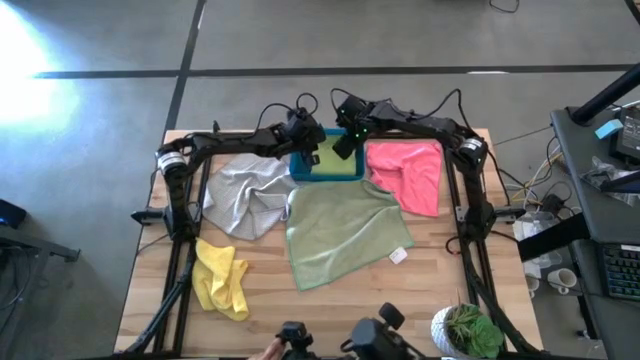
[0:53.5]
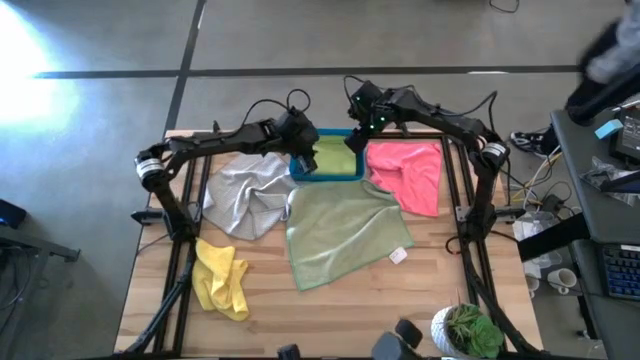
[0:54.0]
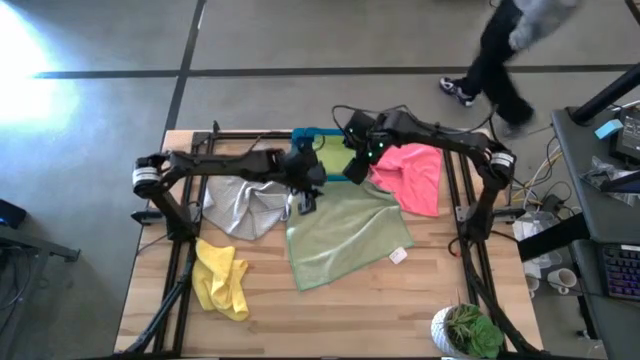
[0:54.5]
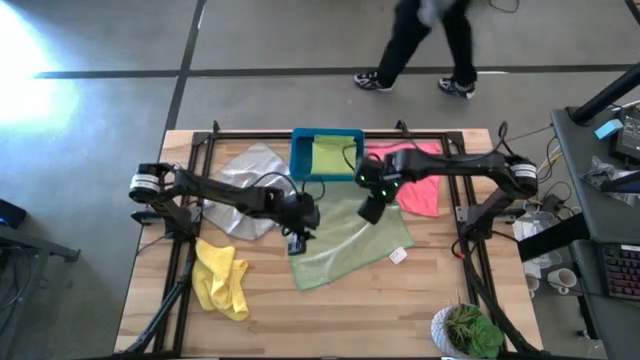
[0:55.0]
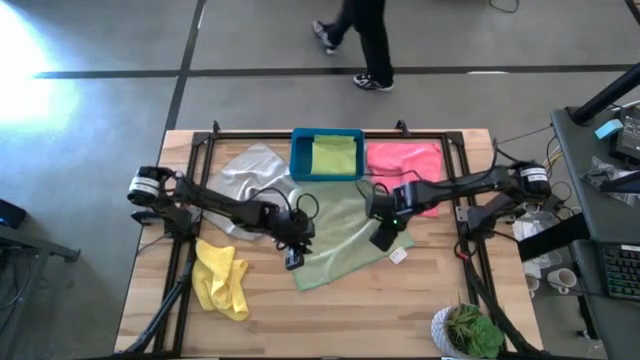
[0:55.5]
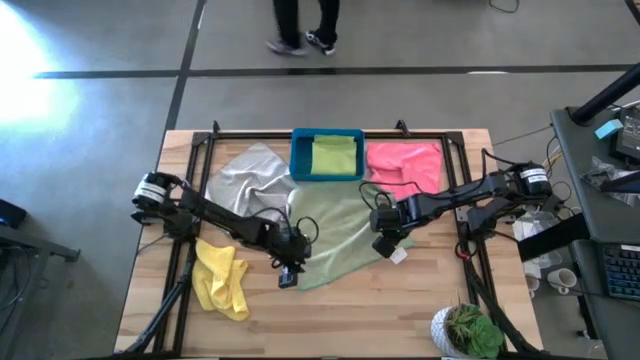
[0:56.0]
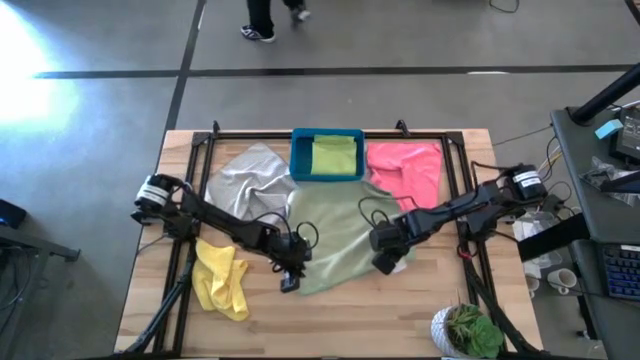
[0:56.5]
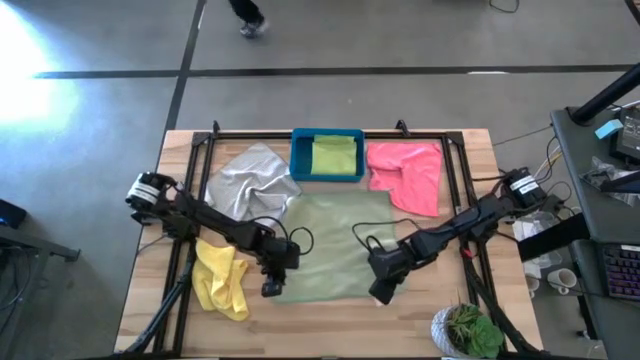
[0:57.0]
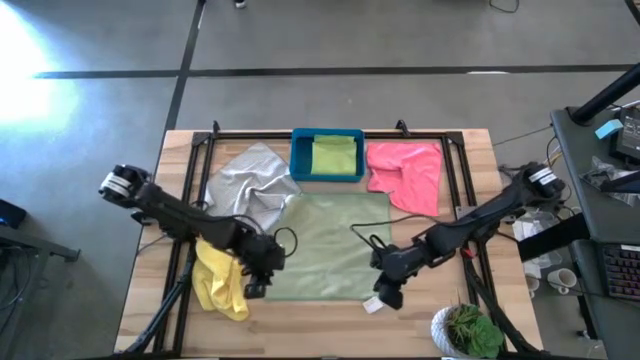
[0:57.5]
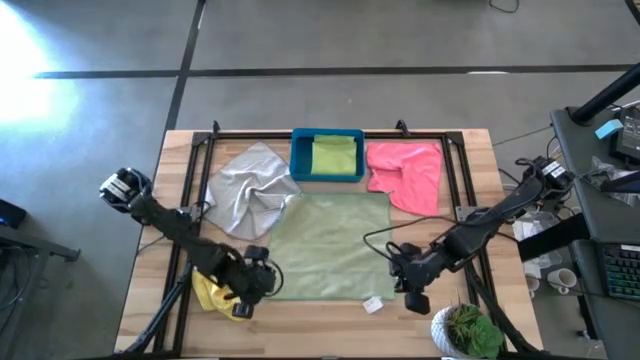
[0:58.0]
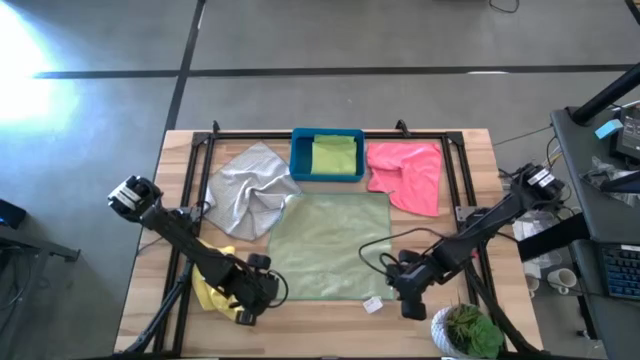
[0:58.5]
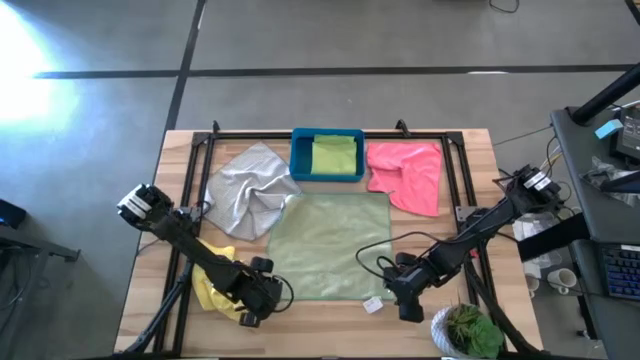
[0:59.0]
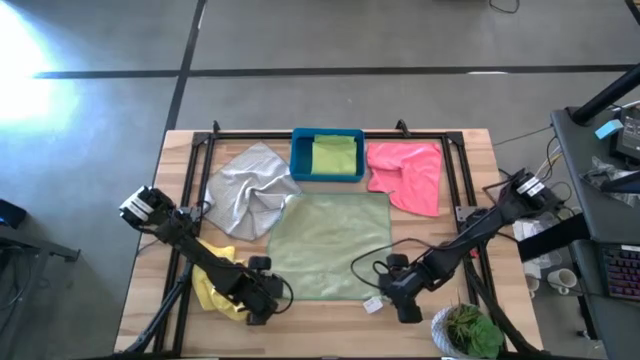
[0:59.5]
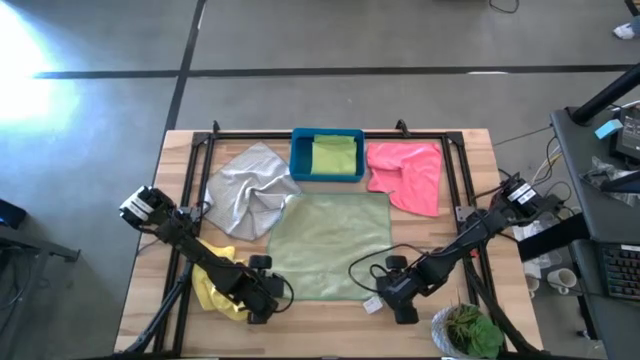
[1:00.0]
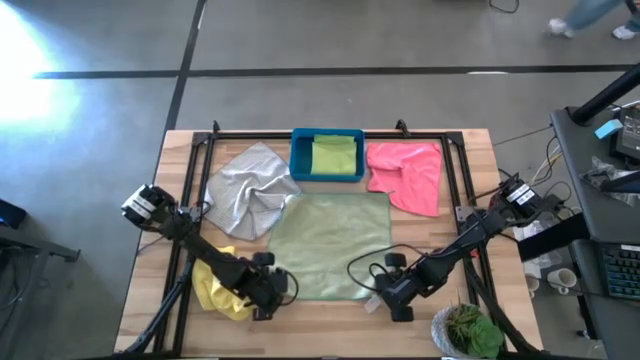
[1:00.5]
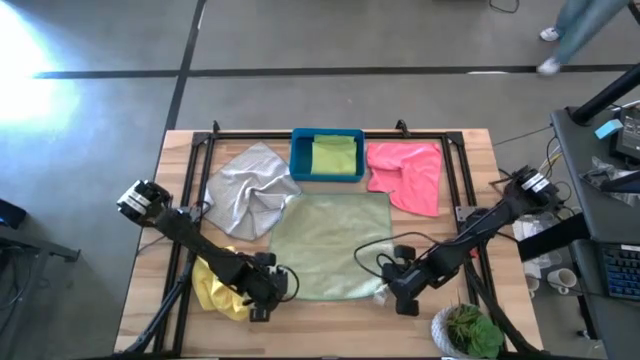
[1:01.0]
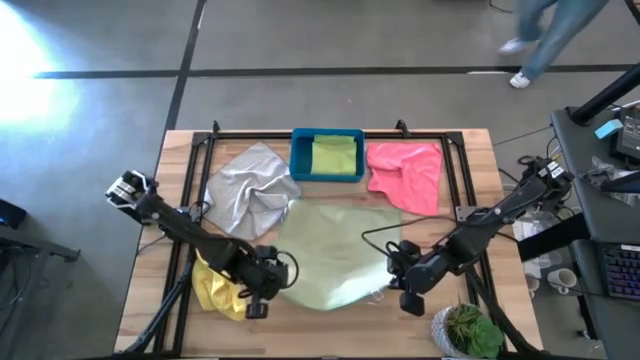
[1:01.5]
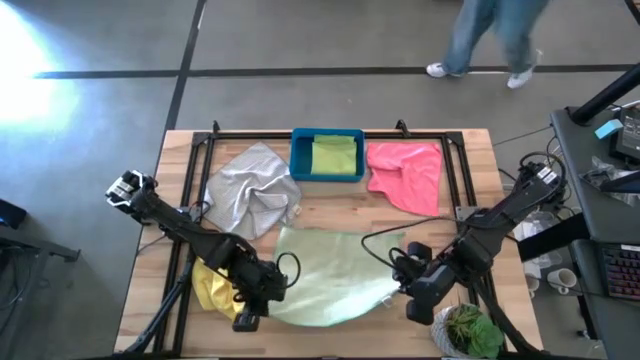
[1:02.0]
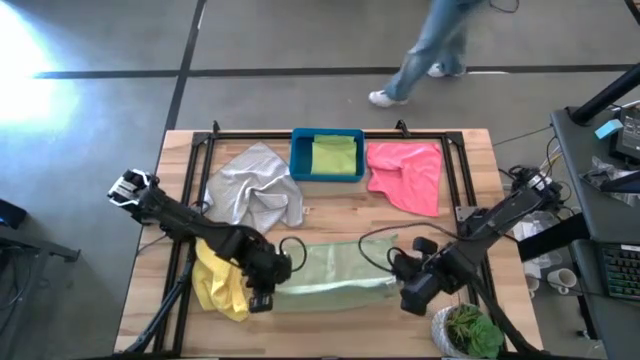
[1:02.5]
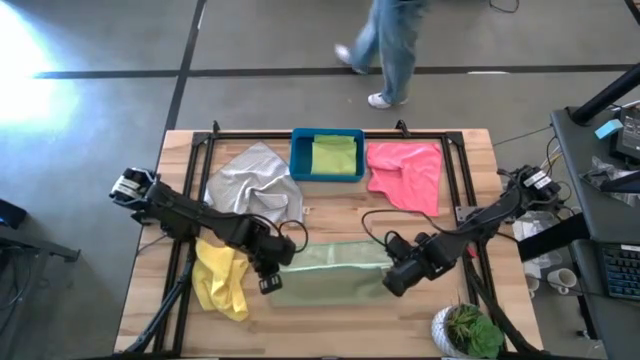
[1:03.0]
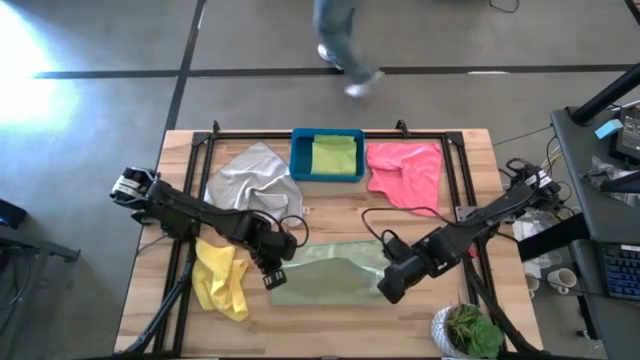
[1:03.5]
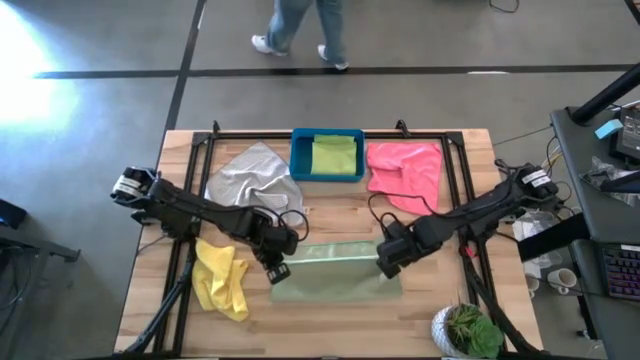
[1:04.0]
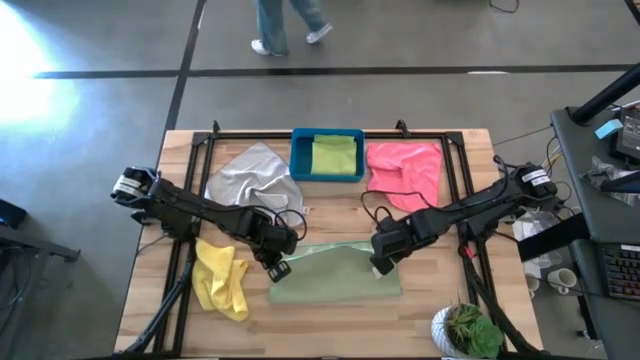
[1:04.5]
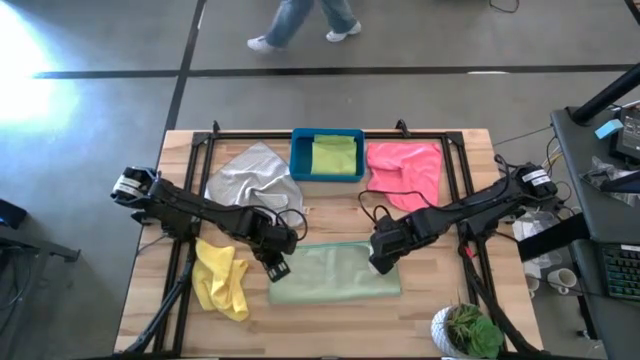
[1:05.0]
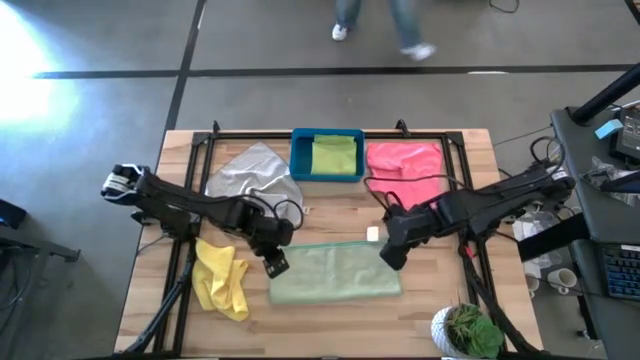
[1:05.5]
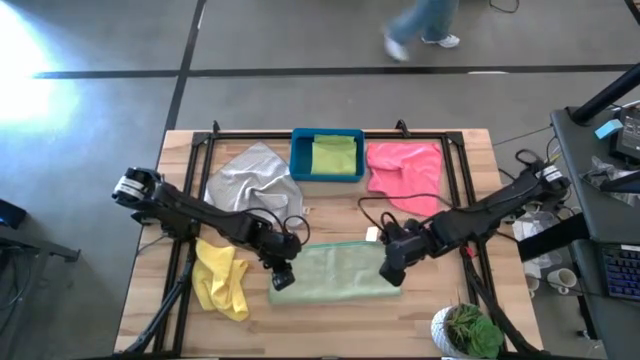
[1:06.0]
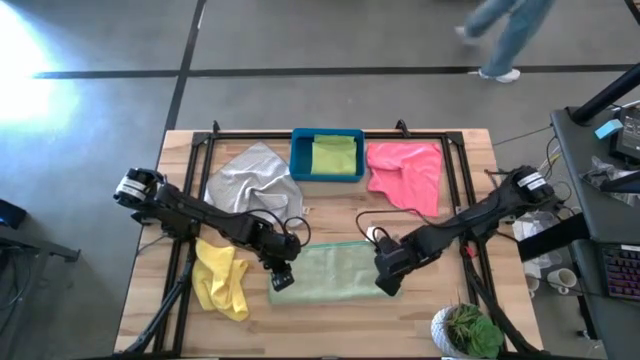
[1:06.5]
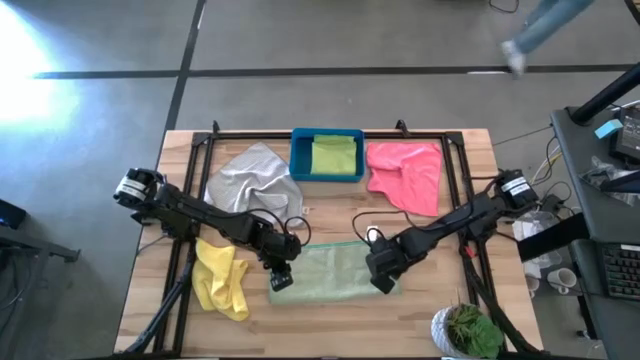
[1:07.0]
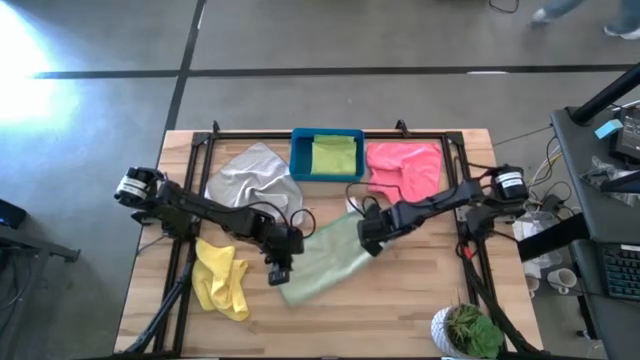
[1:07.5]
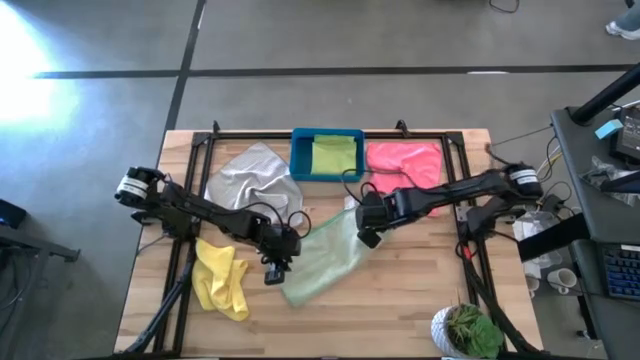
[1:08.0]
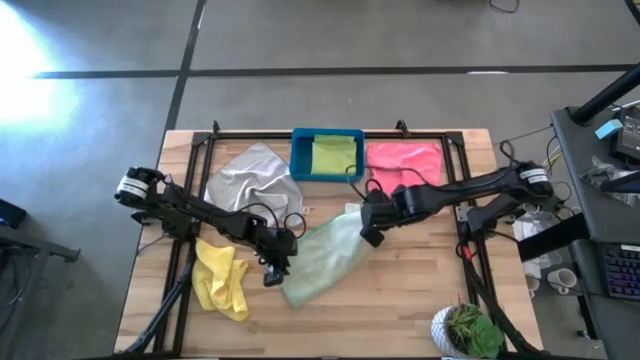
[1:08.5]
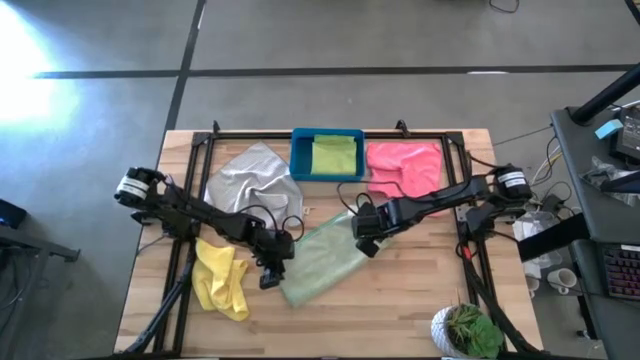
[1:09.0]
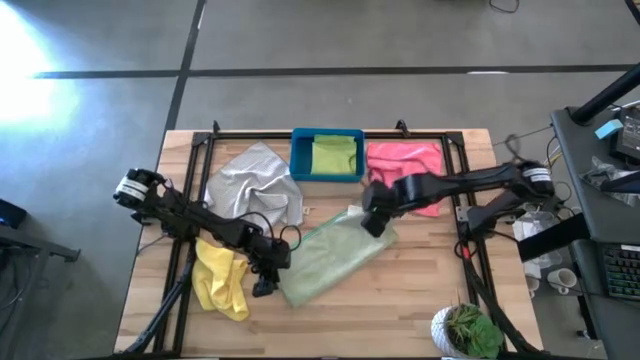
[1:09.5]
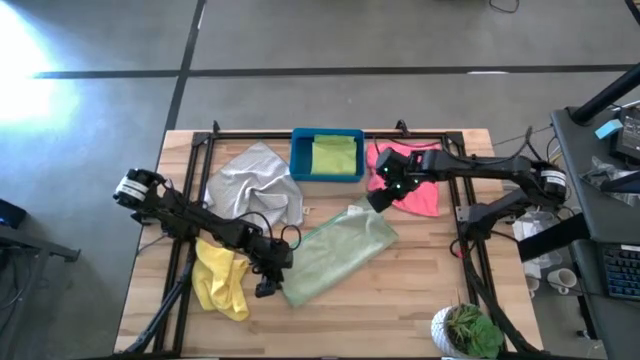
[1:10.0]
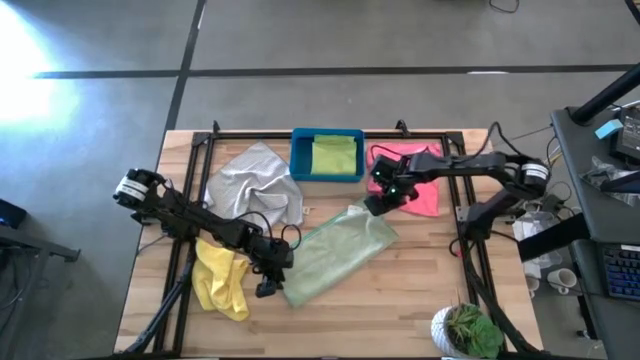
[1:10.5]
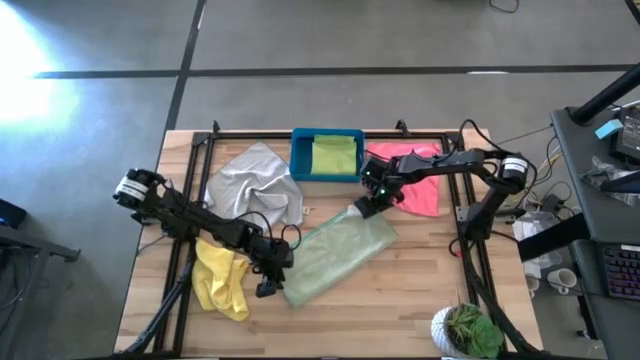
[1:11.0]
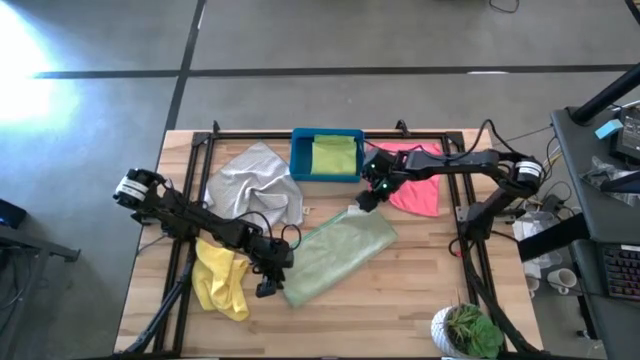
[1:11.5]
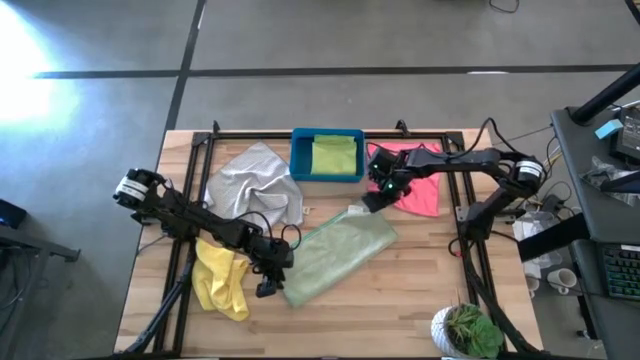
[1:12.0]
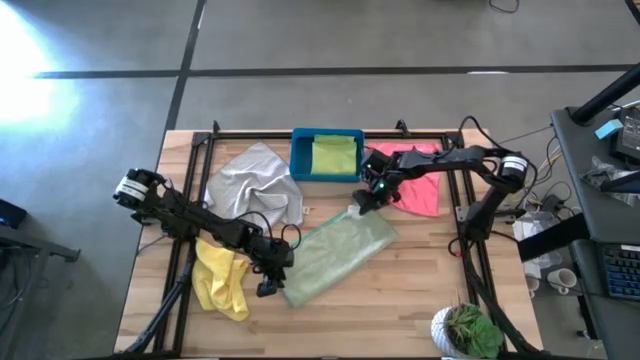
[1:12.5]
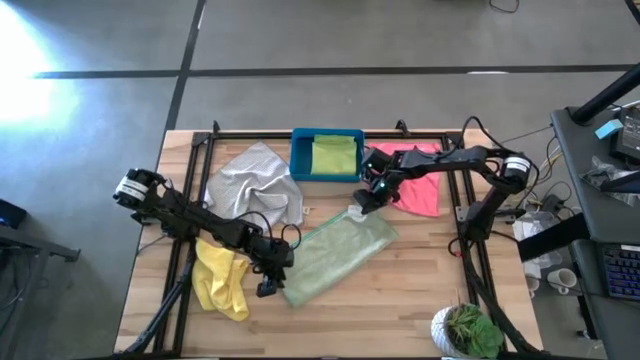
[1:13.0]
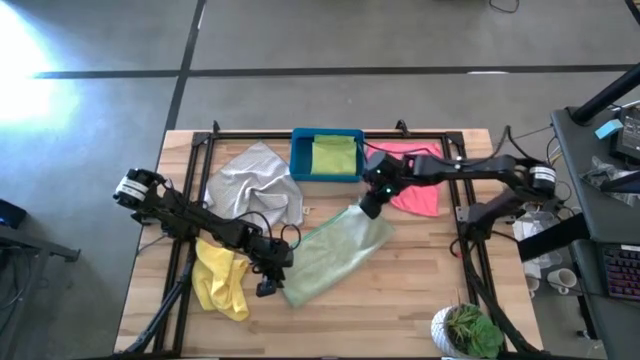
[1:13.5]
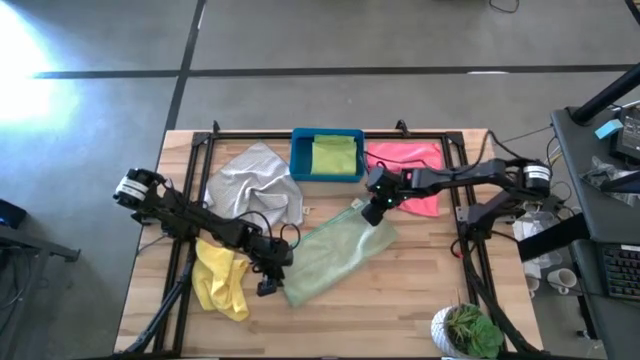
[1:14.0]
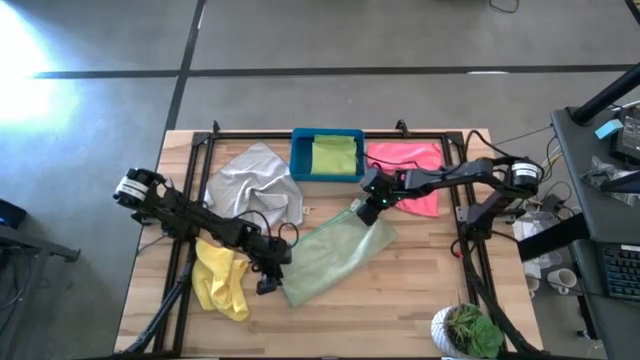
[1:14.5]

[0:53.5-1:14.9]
Task: Fold microfiber towels
Fold the green microfiber cloth
